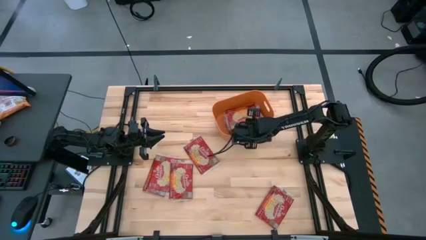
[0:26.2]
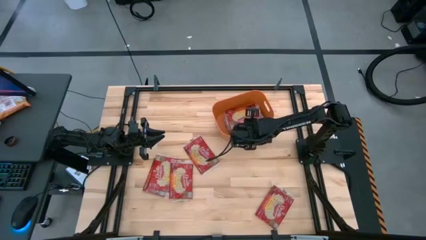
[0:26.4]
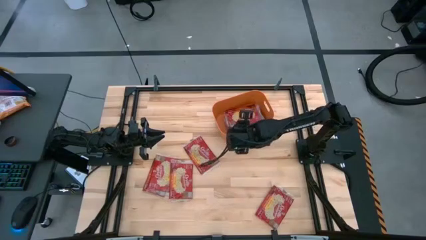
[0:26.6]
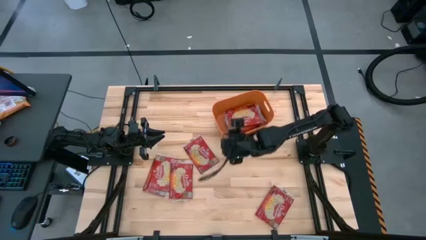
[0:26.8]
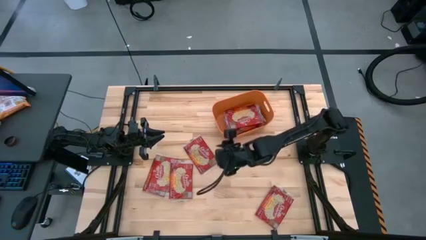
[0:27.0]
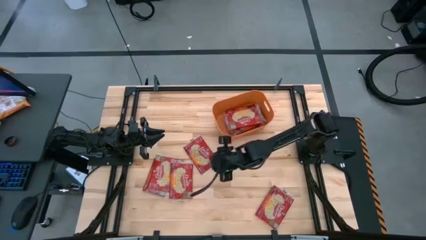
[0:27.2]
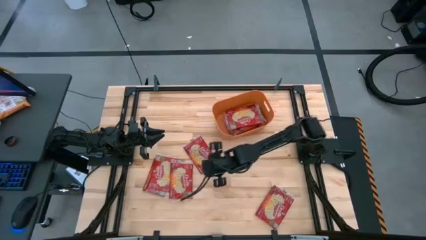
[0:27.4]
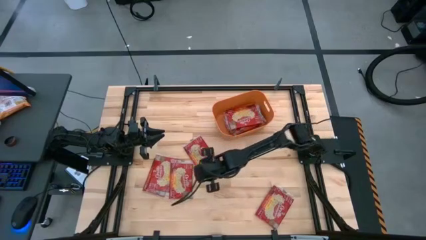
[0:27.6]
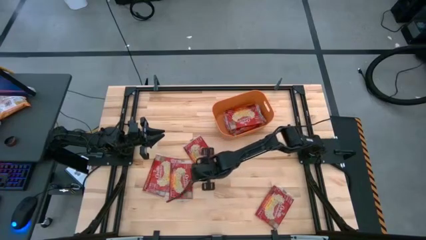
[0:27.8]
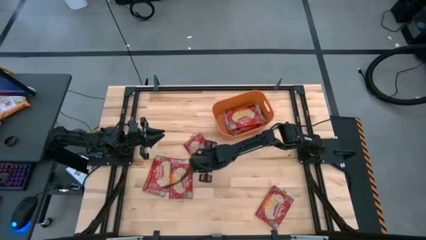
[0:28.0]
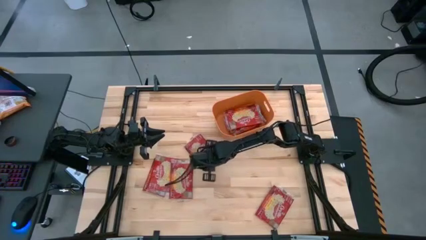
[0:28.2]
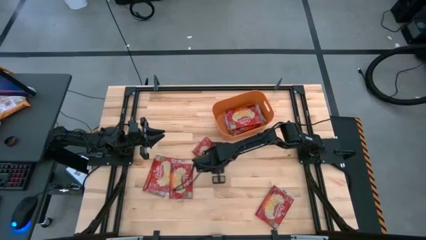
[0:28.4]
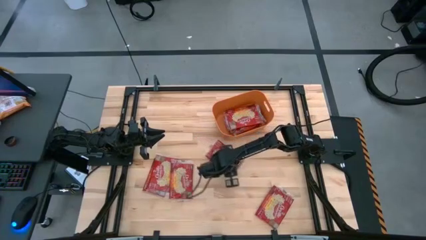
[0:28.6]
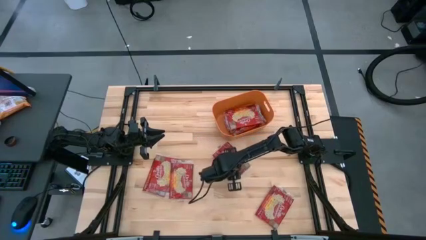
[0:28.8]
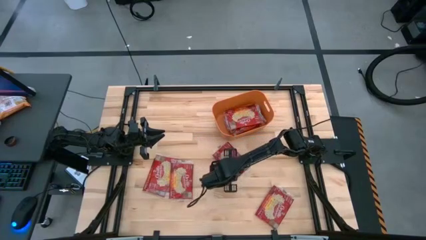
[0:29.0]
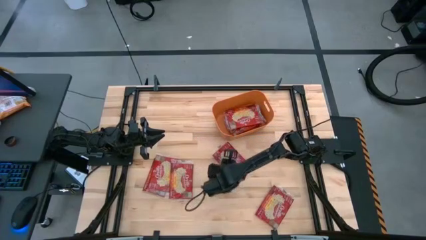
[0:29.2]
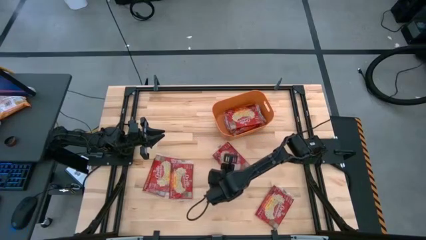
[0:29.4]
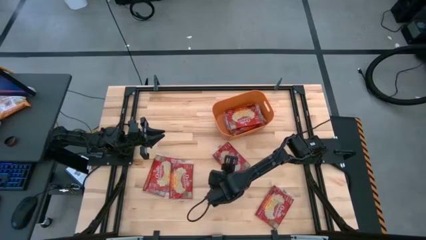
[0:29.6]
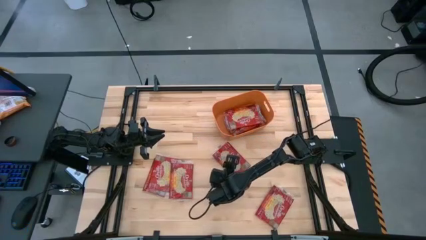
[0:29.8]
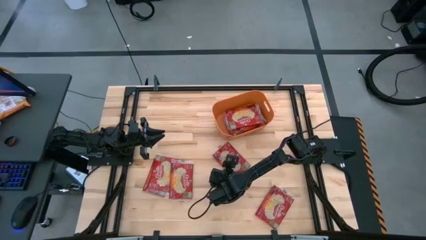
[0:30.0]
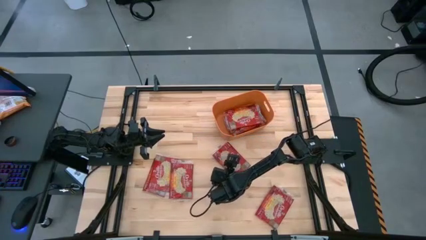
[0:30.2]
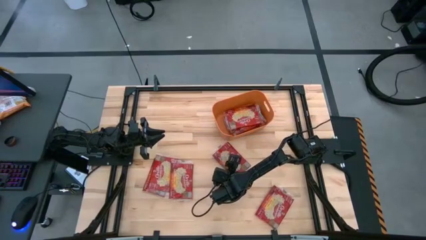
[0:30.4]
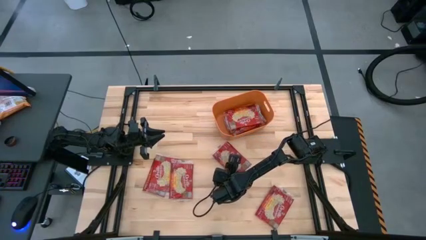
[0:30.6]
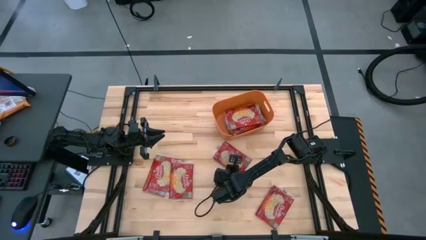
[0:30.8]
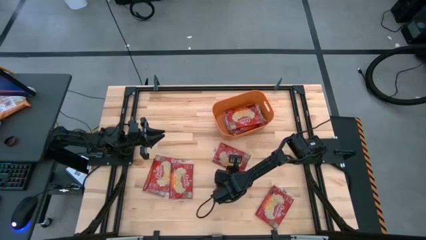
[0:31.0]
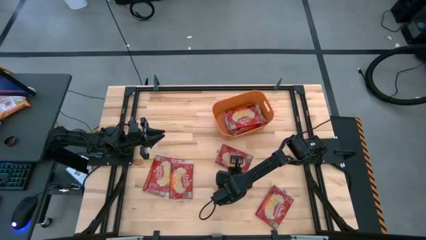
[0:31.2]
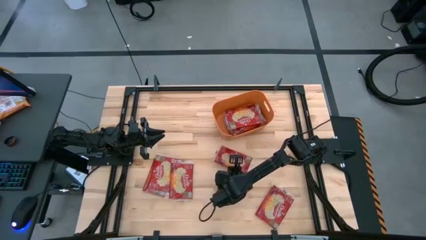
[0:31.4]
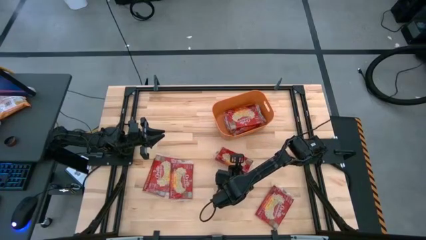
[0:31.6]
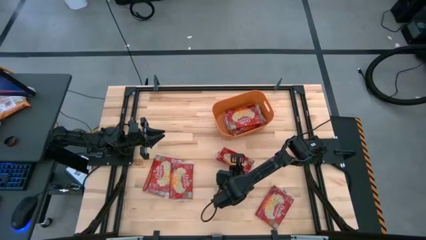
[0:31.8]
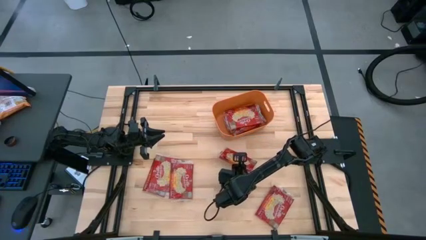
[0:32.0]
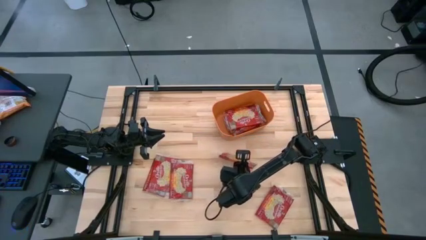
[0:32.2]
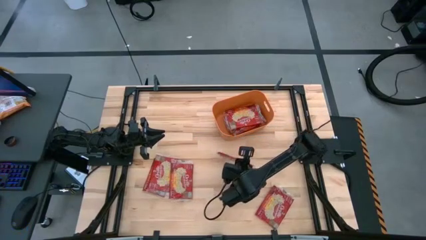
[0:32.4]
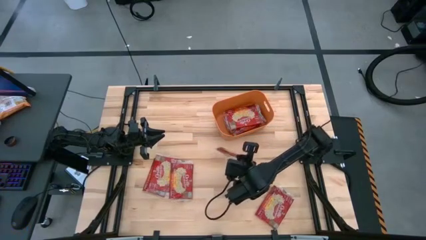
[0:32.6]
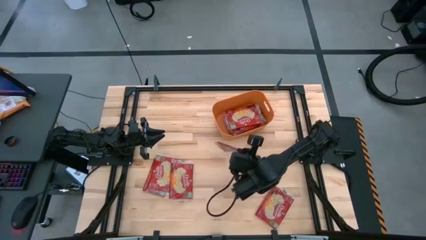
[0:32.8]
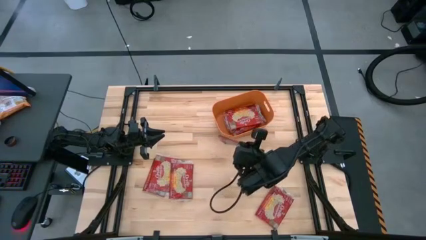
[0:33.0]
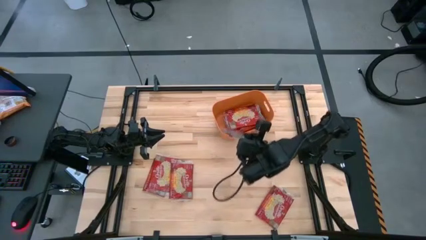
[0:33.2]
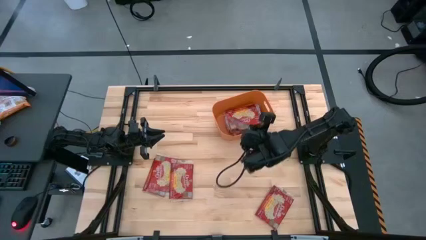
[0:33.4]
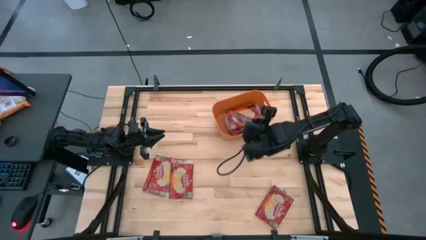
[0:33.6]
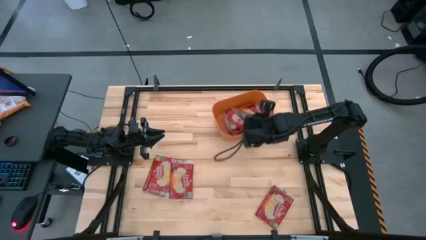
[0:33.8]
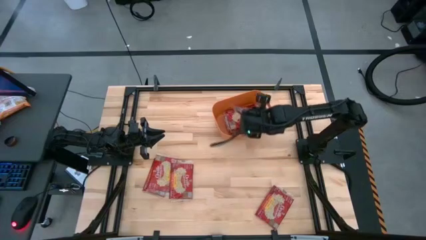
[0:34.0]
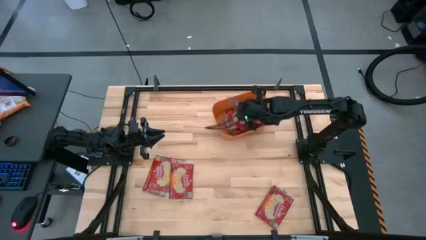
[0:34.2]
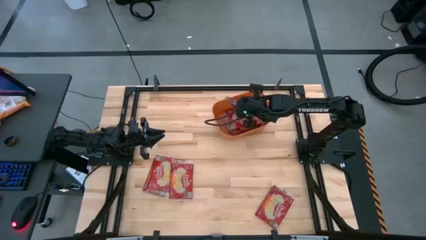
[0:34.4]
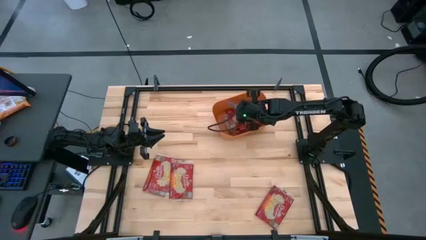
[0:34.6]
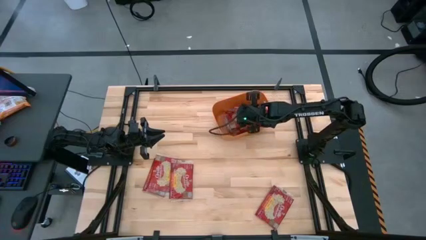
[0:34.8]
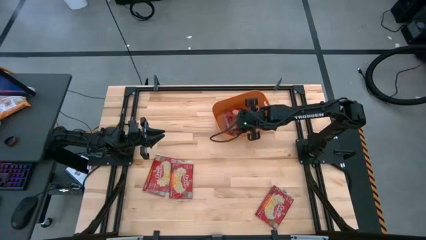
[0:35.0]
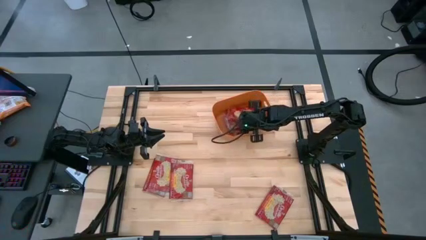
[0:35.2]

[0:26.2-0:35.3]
Task: Sort popcorn bags into baskets
Put the popcorn pack into the orange bin

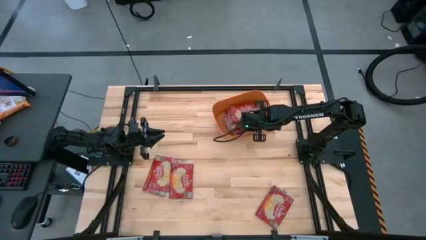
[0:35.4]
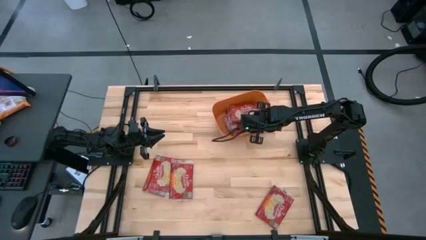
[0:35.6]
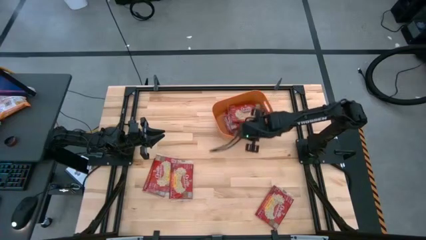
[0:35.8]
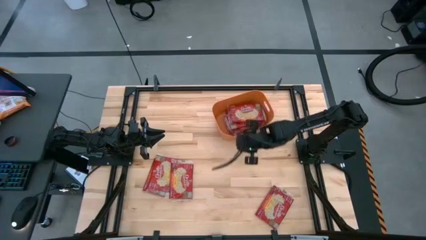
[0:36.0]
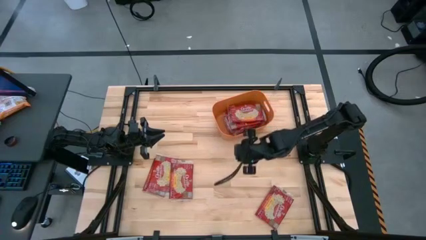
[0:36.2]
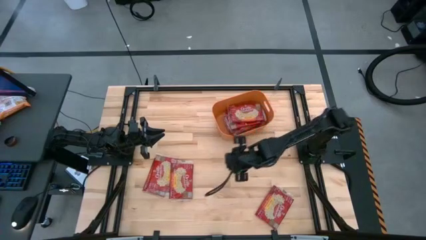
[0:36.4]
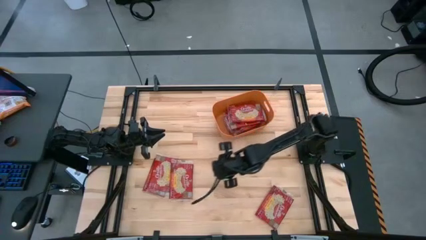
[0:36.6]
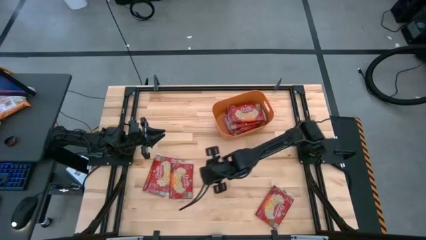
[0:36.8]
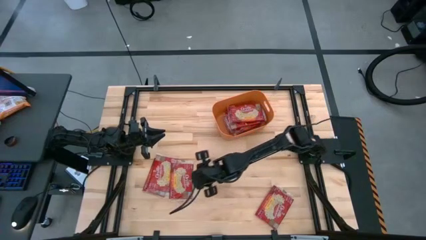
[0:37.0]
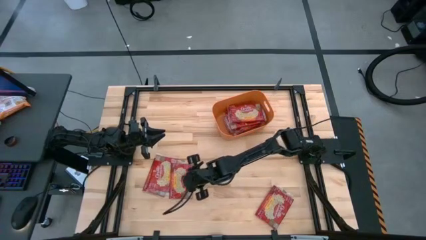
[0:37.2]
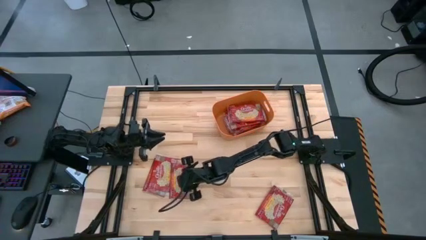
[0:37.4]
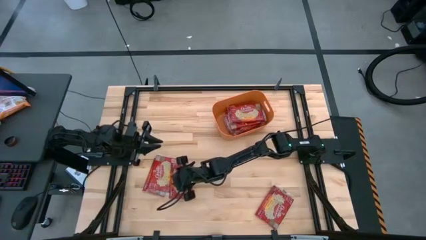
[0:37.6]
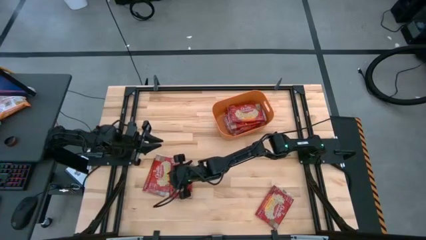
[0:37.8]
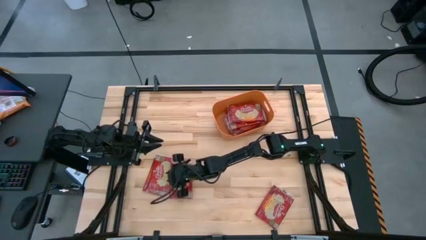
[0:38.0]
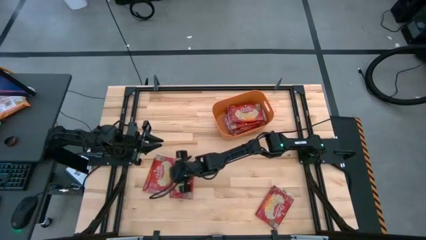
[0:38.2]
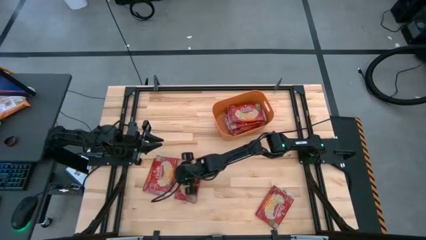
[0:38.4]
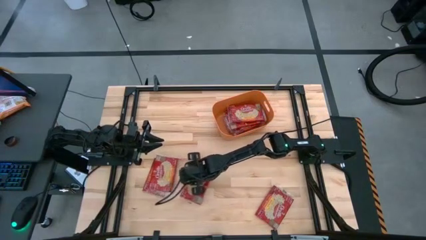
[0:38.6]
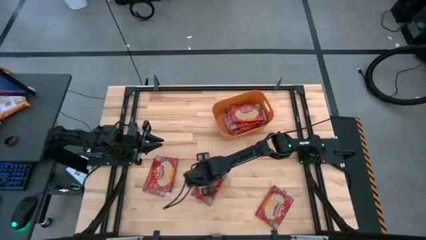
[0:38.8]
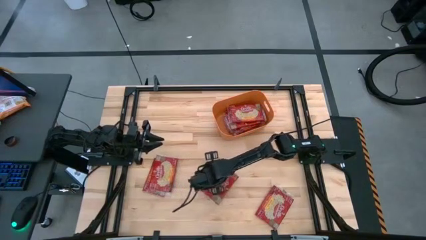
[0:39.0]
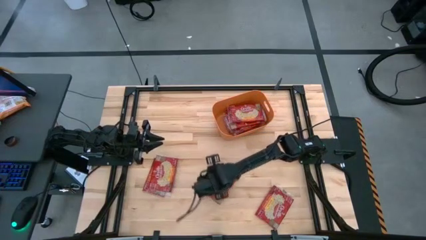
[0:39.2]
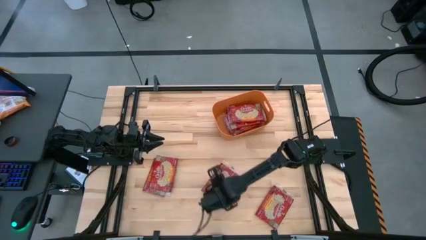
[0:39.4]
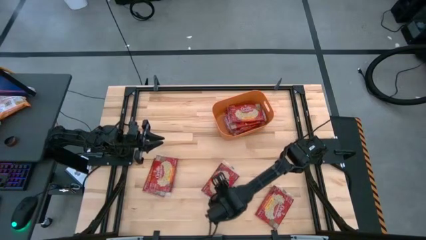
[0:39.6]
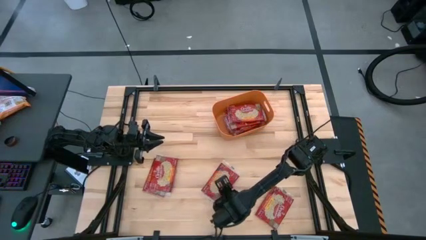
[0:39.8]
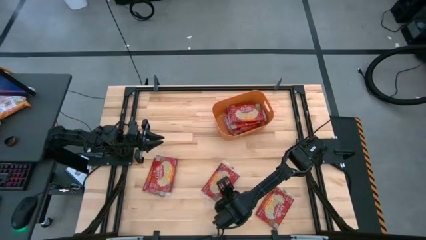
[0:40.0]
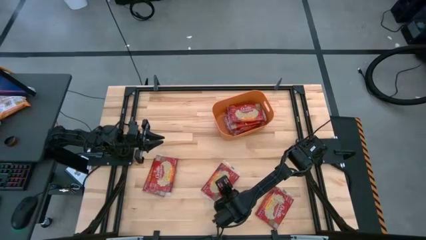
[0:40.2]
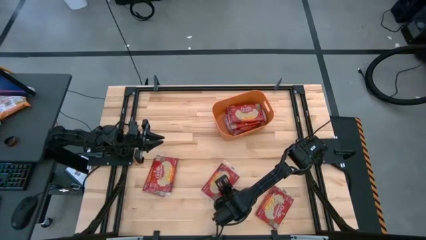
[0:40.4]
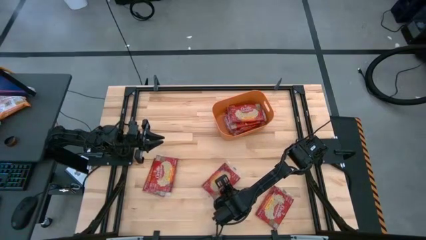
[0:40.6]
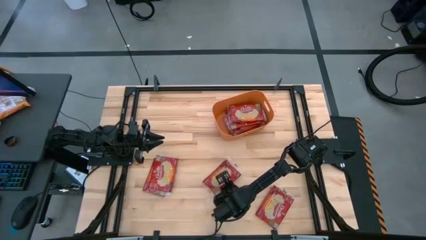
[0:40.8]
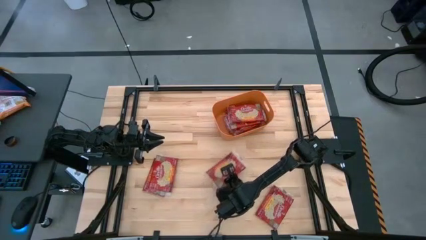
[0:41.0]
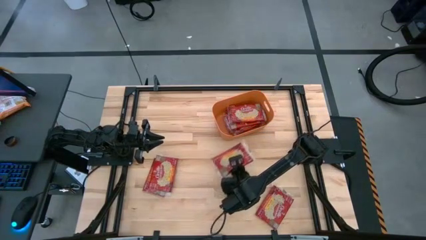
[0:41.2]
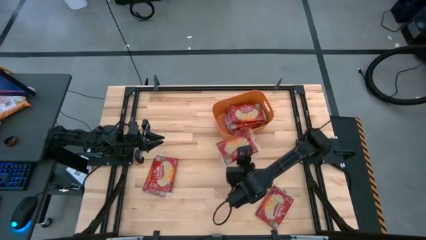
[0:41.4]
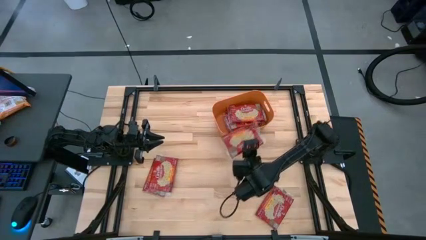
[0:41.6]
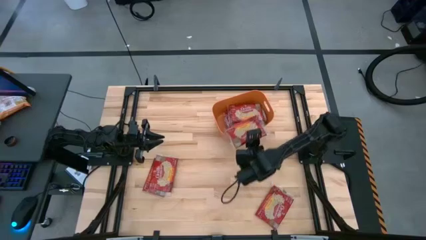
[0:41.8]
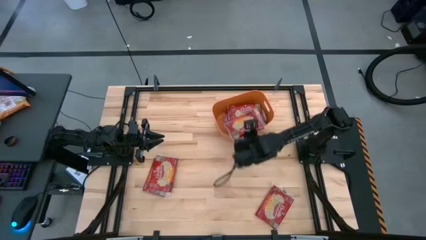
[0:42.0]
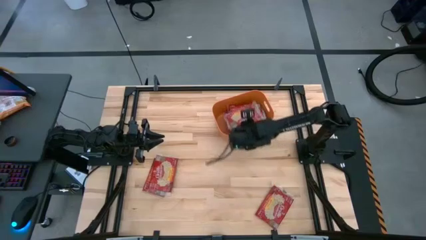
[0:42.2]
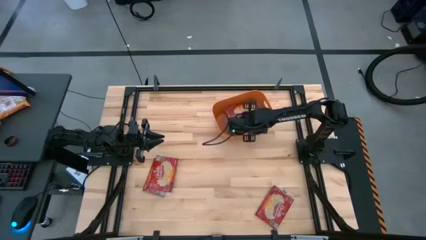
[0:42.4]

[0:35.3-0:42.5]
Put the popcorn pack into the orange bin
